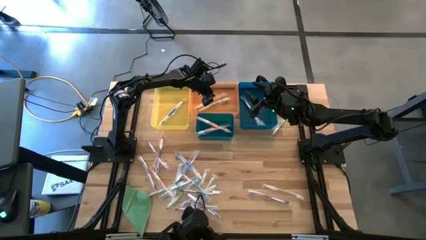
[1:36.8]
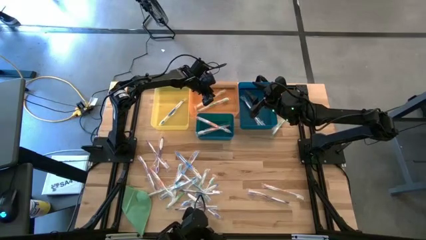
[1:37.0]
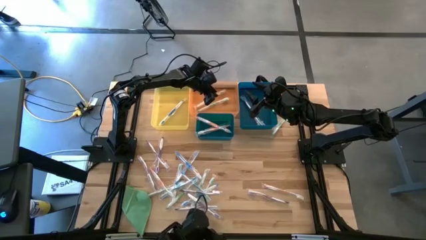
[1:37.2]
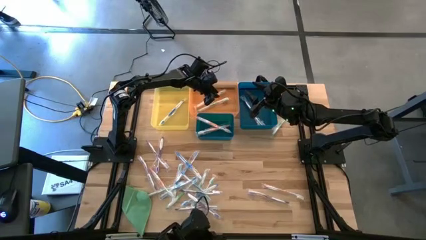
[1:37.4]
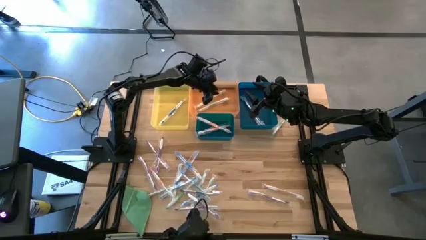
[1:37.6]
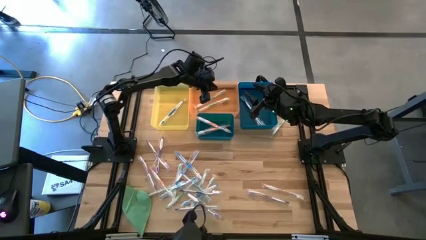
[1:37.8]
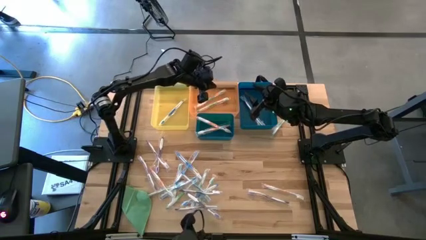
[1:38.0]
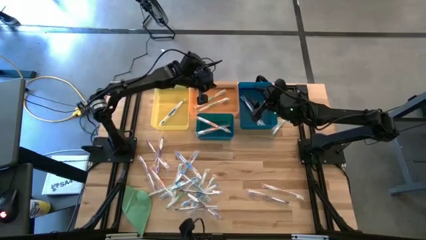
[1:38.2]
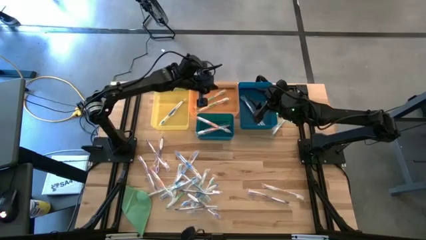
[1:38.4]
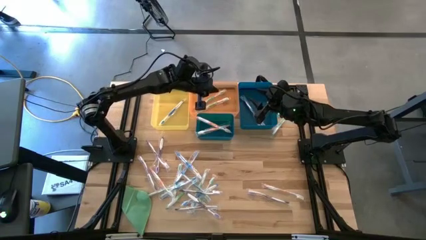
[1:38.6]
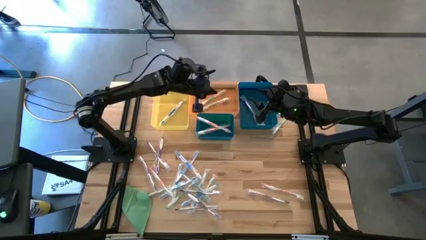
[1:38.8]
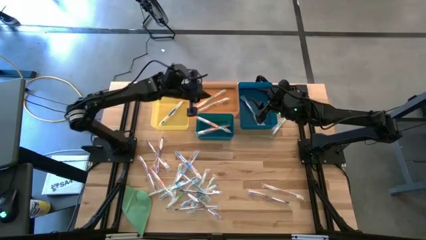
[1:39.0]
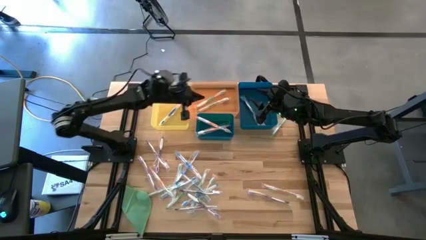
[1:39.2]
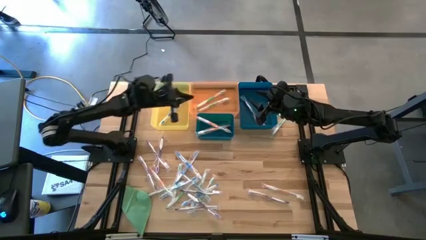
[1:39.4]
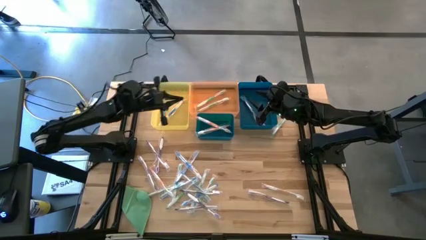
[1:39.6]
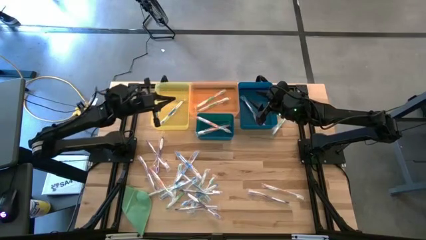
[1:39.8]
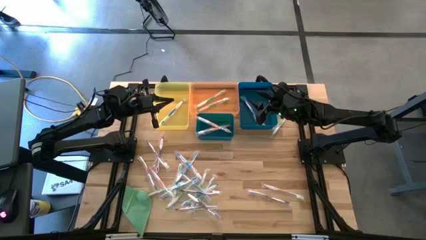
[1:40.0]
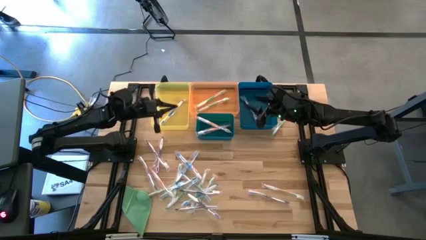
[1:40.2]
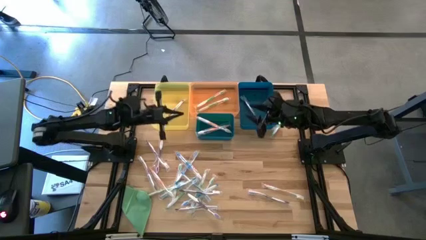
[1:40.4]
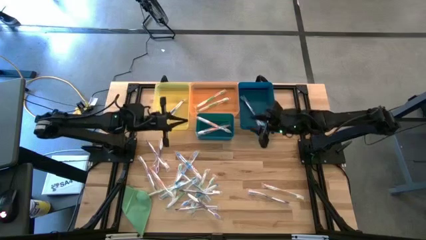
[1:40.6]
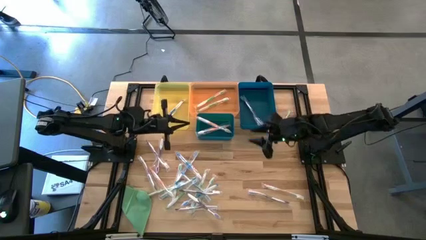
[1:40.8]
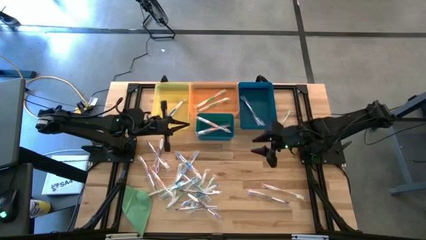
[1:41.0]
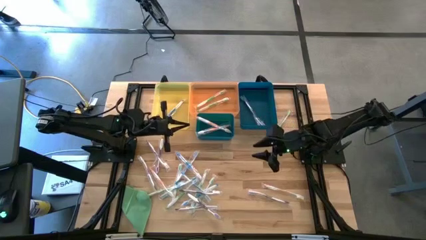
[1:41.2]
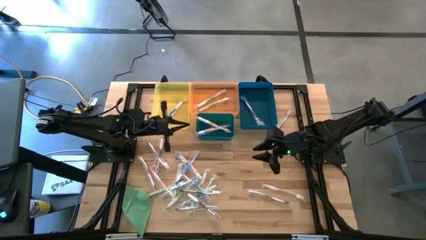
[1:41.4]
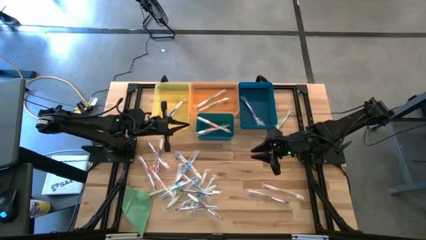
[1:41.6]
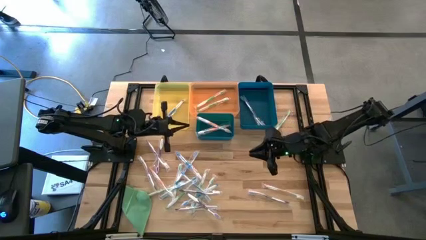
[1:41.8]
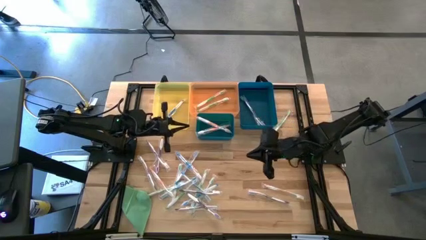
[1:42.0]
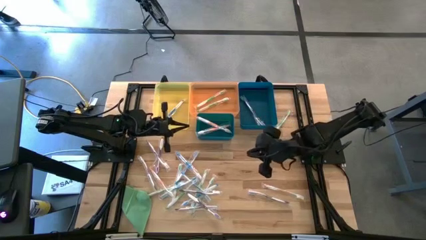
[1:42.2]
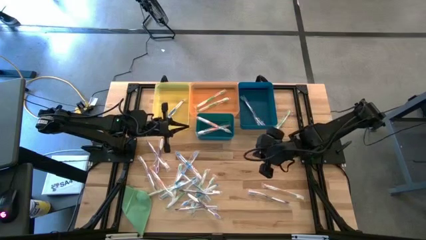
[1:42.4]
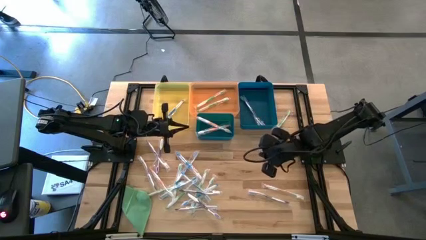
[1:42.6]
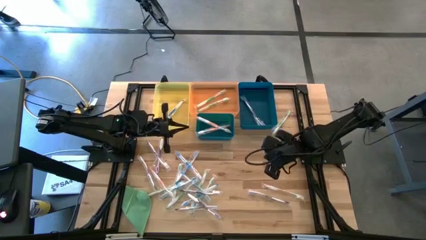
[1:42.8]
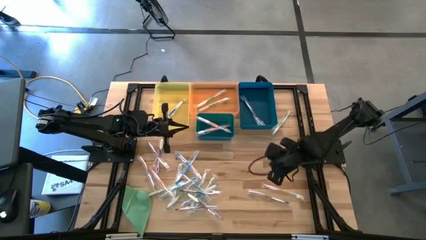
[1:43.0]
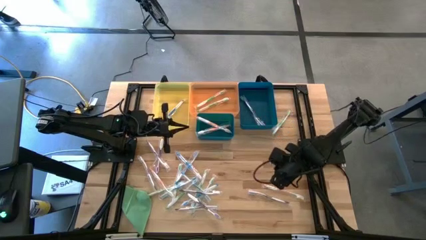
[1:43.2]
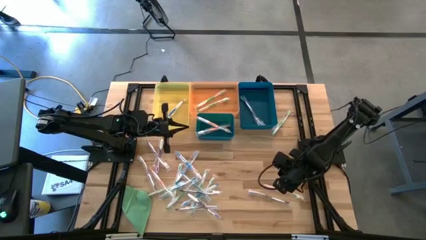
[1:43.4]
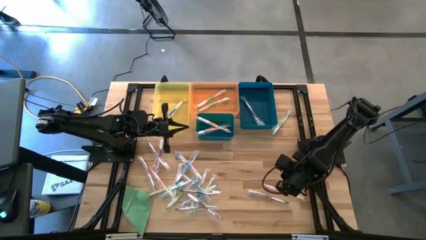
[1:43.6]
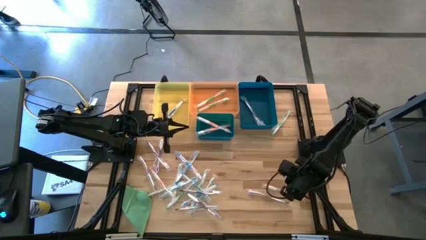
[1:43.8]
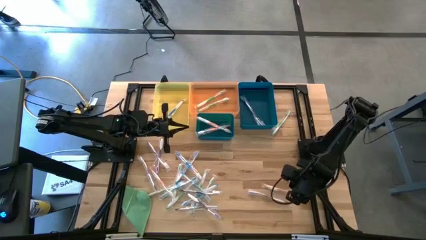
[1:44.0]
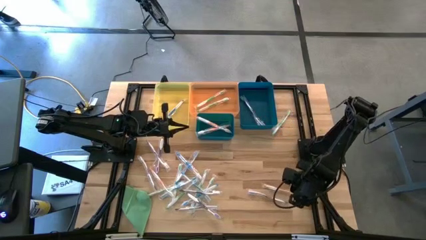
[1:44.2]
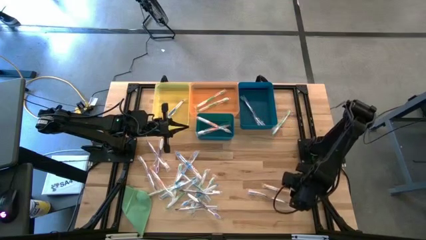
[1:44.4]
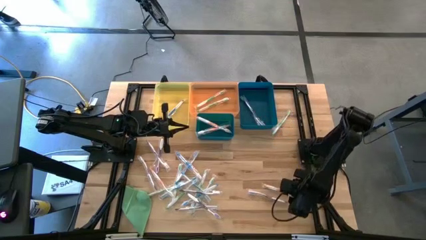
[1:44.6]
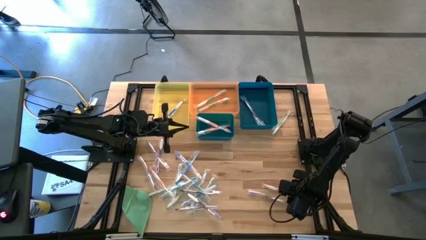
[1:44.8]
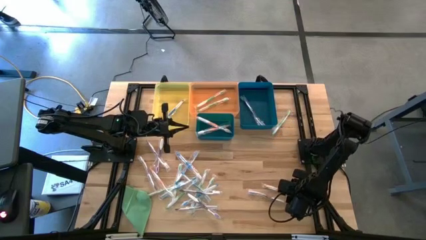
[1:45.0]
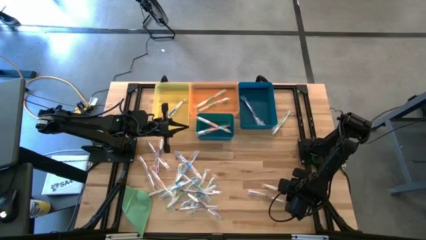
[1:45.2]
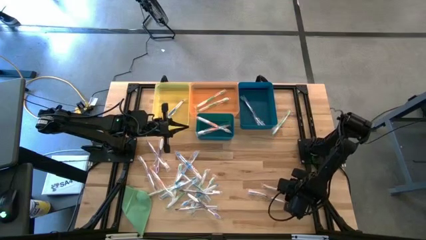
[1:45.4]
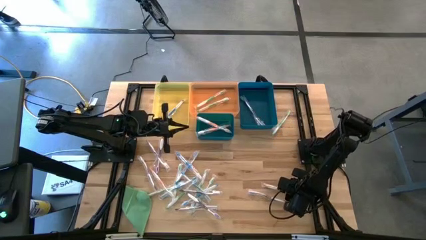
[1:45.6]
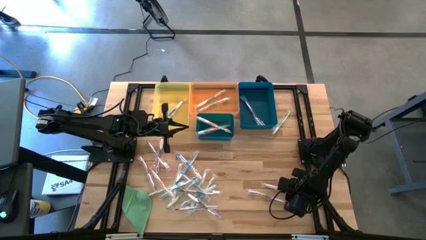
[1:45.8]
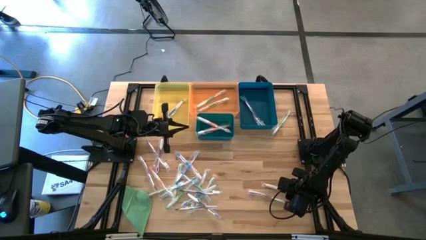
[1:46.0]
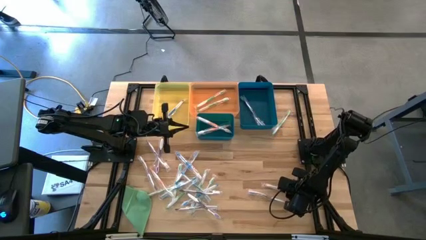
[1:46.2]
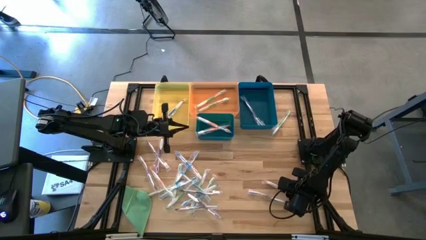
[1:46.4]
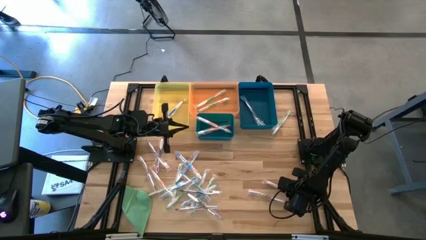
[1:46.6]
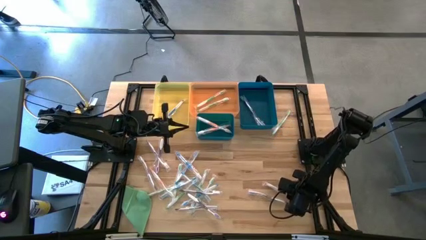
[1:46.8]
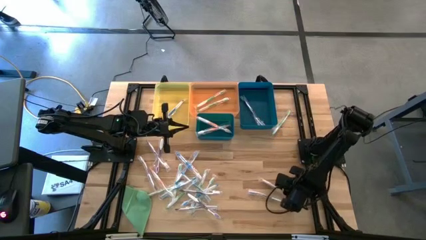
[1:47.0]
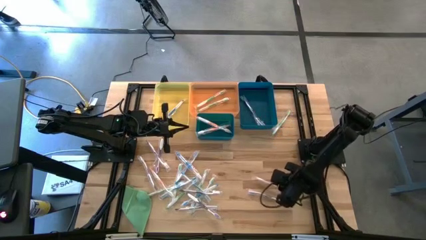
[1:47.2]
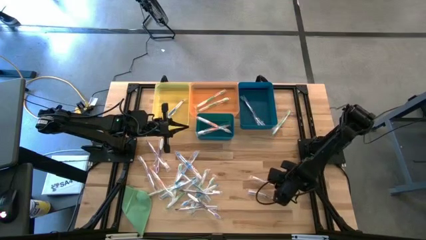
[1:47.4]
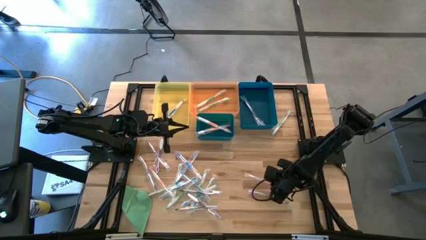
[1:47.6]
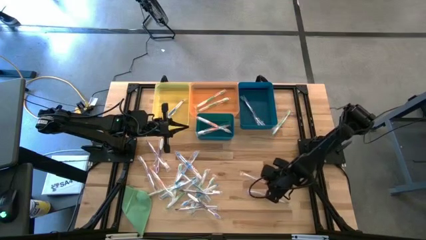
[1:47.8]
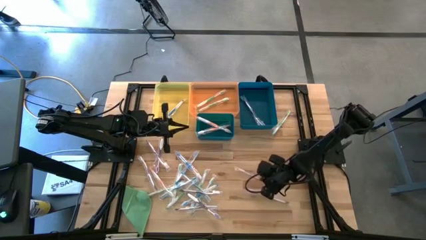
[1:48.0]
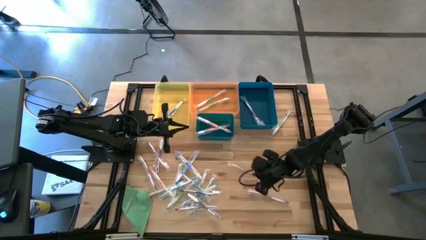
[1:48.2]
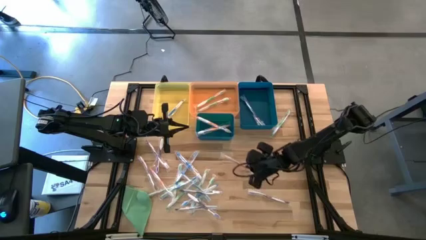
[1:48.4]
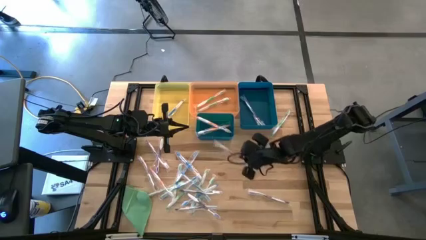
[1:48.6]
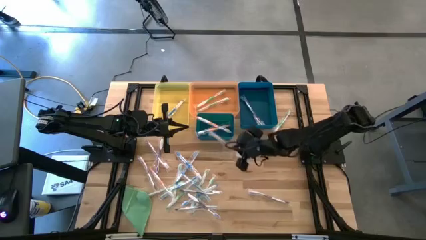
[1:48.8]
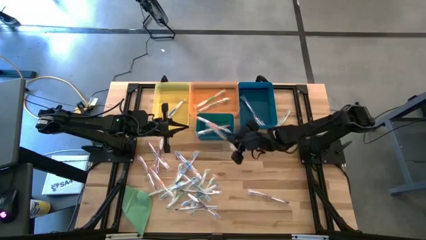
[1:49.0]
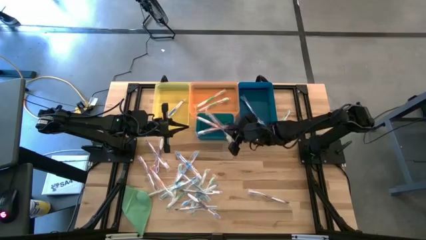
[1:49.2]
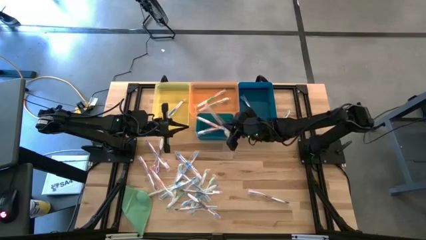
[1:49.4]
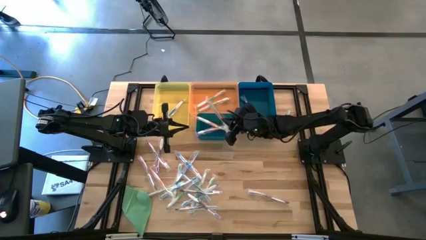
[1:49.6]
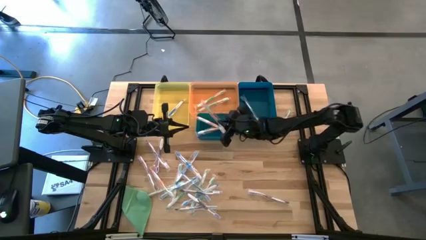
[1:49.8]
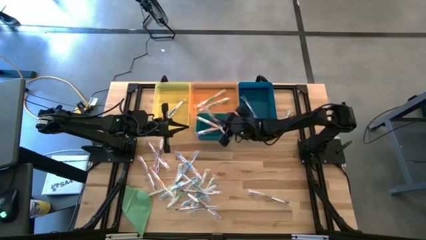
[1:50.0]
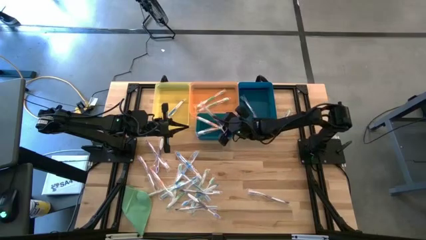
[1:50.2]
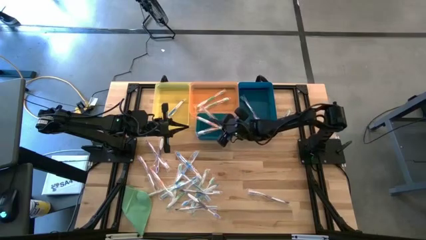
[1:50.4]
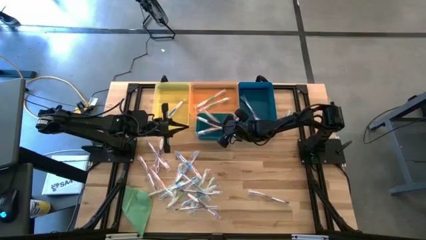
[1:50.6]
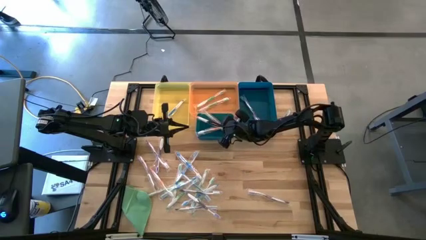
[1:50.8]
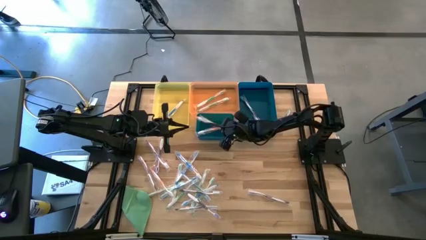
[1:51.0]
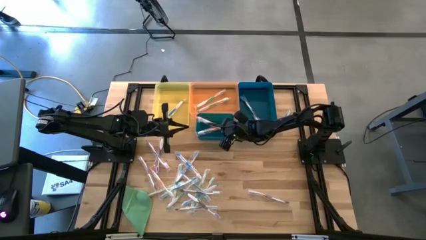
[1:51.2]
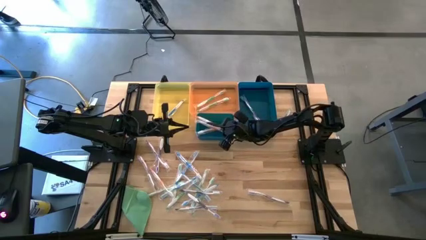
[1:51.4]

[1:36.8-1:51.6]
Task: Pick & Place Toothbrushes
Put the orange toothbrush into the dark green bin
